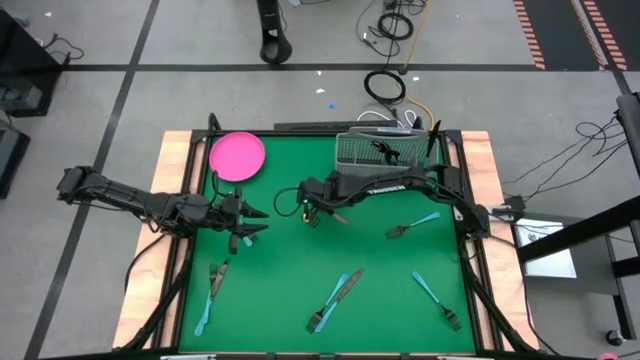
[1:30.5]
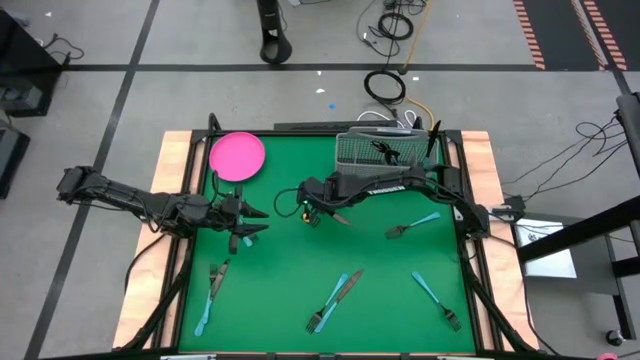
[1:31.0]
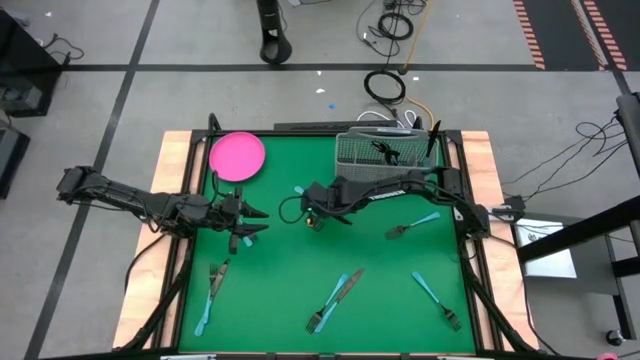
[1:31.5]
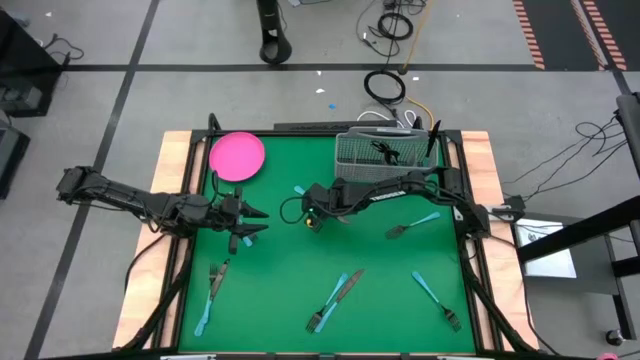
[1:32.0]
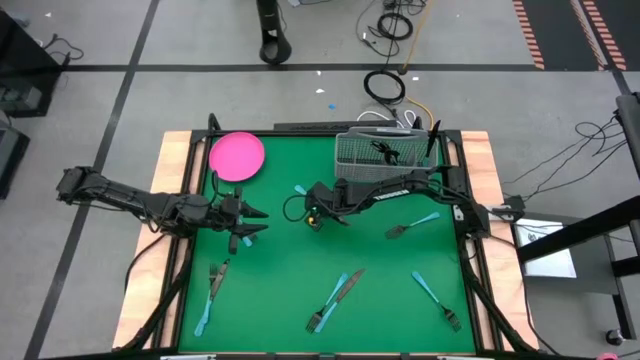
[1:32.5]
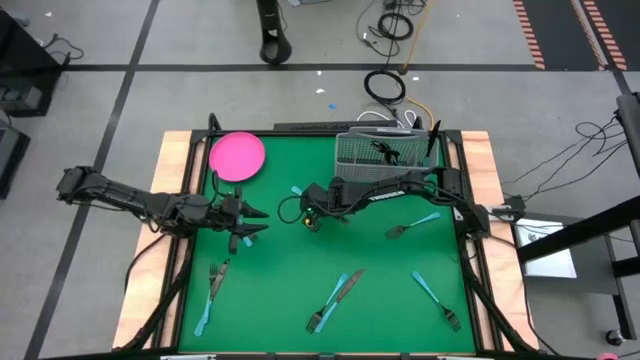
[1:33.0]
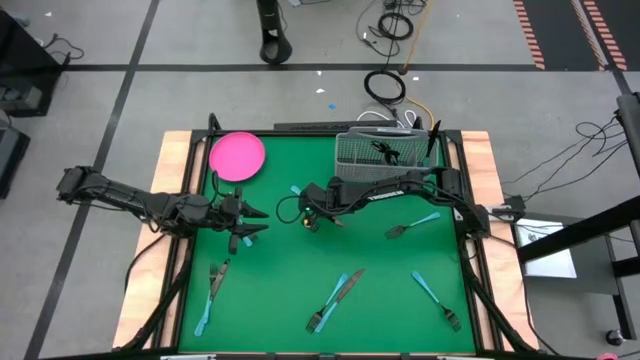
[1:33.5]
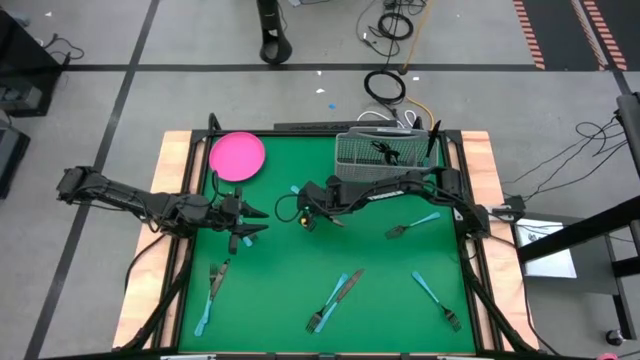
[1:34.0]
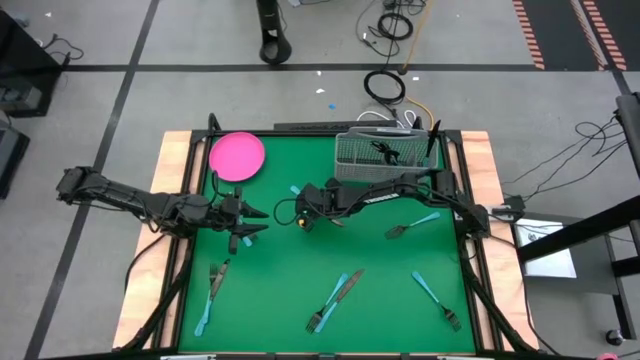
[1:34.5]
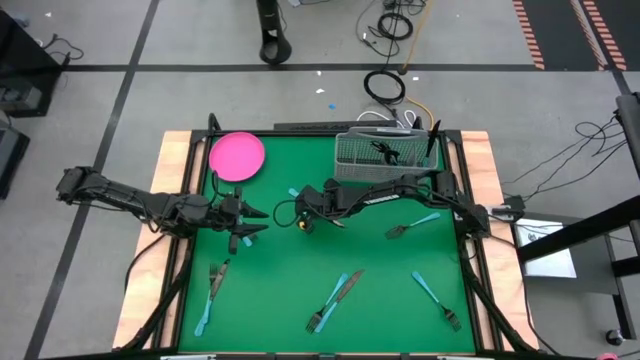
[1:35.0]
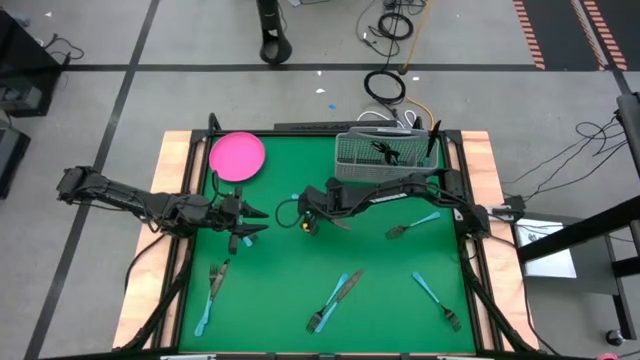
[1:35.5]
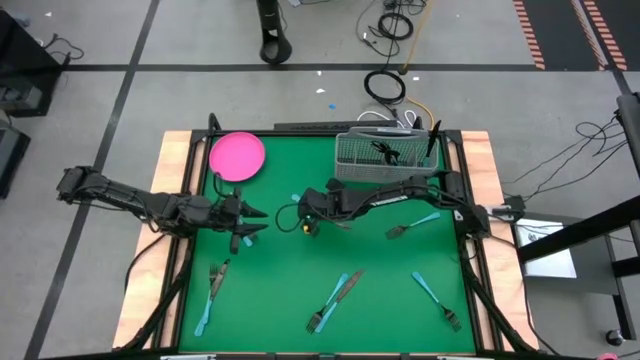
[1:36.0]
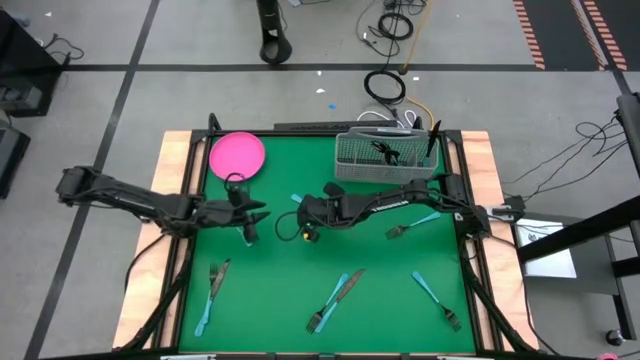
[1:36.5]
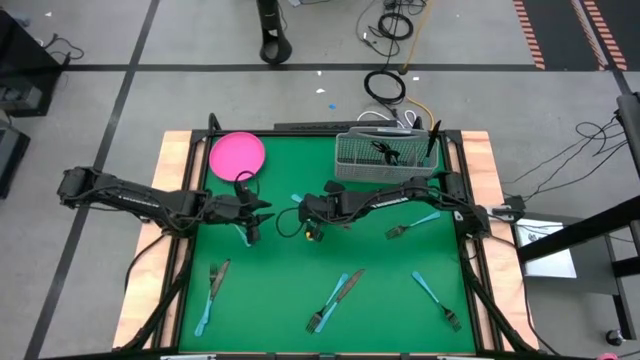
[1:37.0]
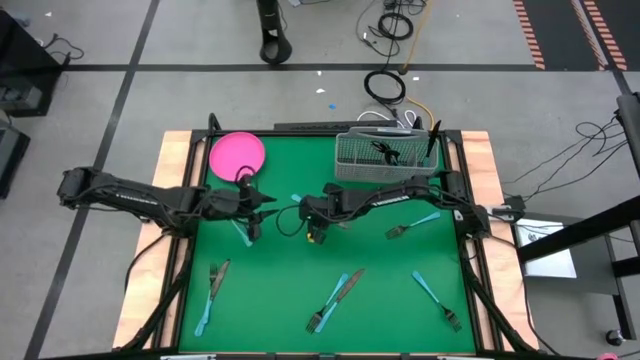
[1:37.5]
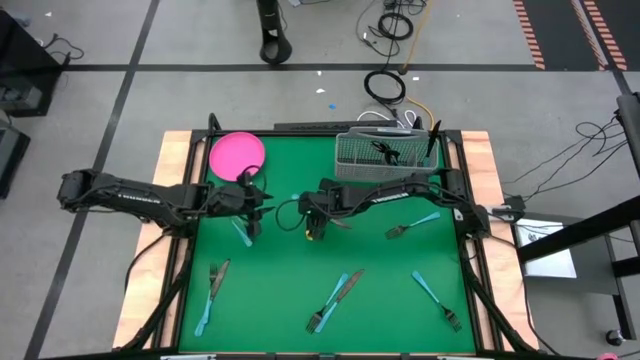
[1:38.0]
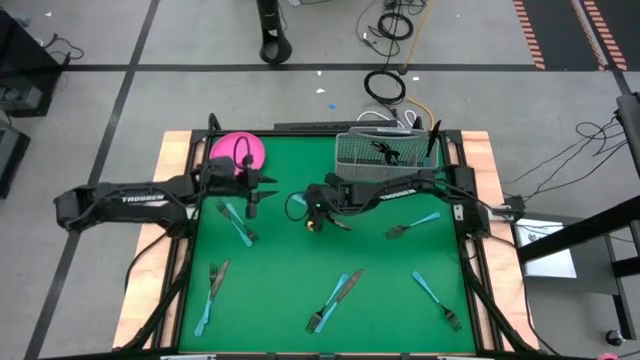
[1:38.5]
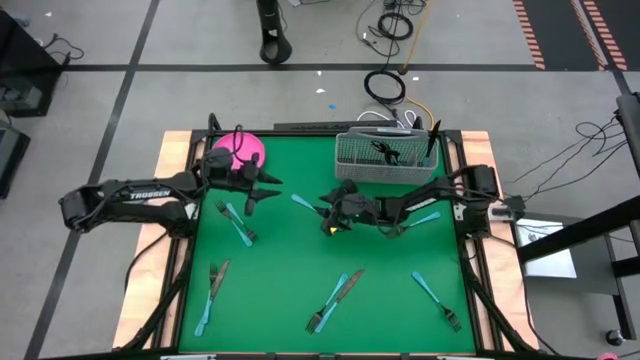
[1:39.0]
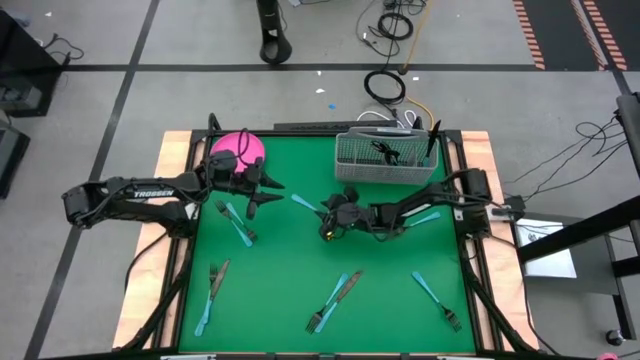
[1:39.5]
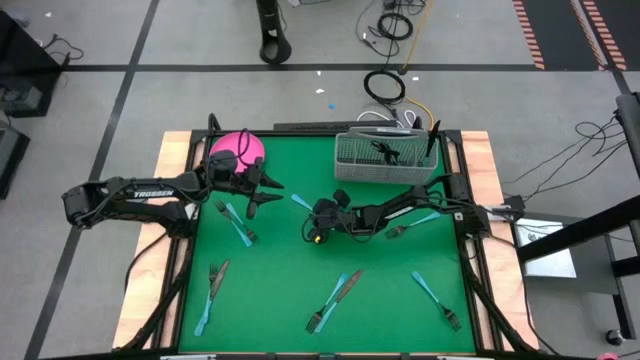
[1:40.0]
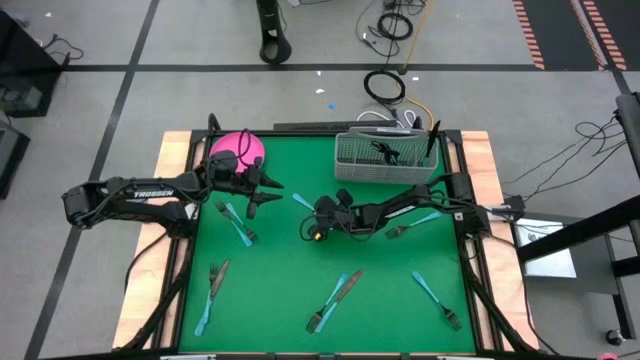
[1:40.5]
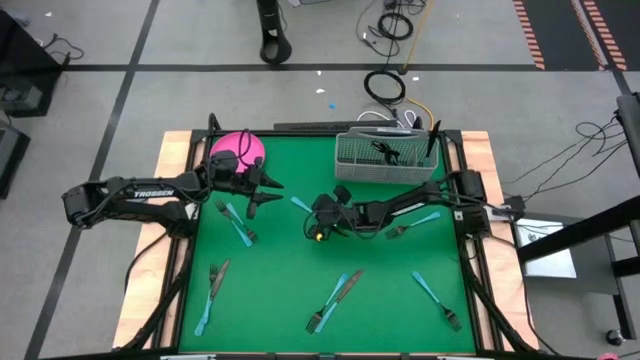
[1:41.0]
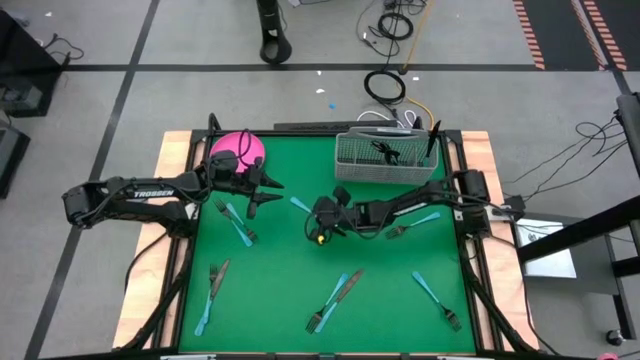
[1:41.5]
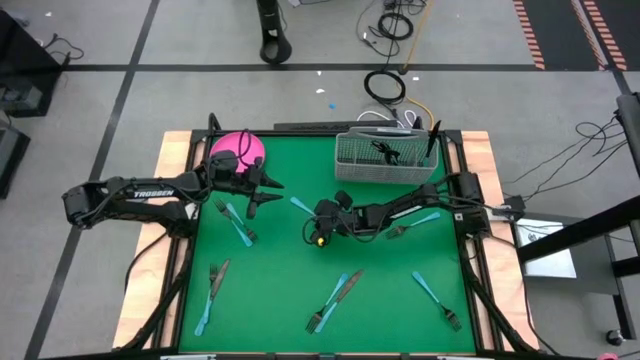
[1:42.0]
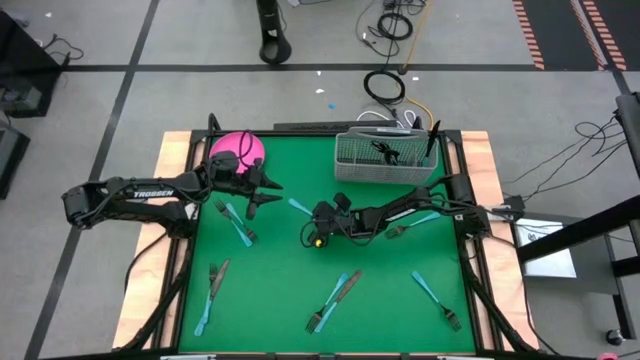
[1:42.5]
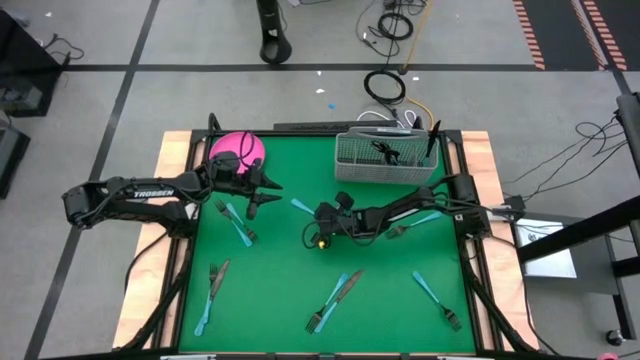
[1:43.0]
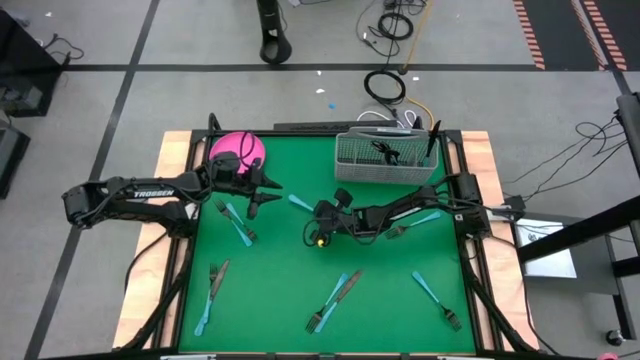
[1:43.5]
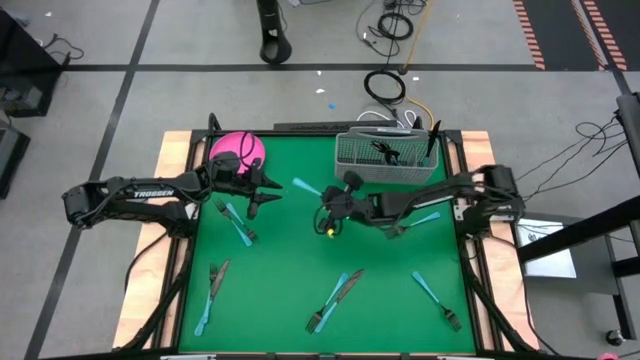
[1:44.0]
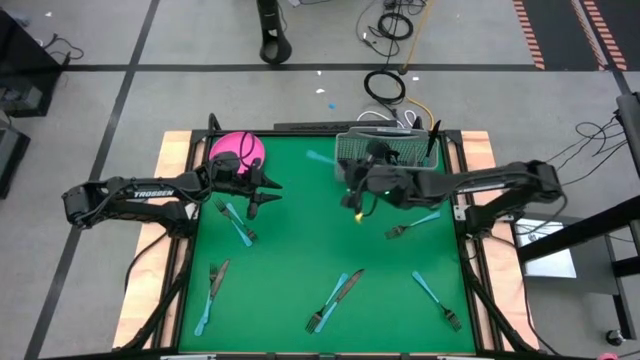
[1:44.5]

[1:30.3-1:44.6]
Task: Sort silverware
Put the top black knife into the cutlery rack with the other black knife

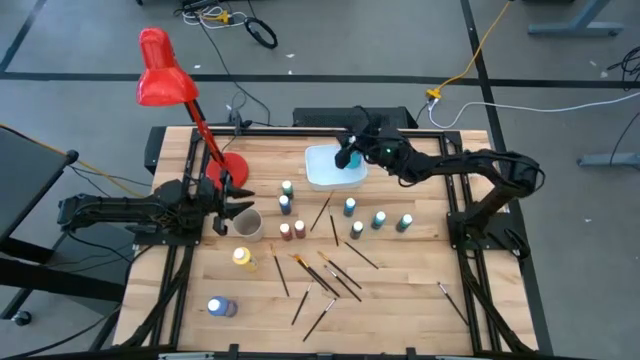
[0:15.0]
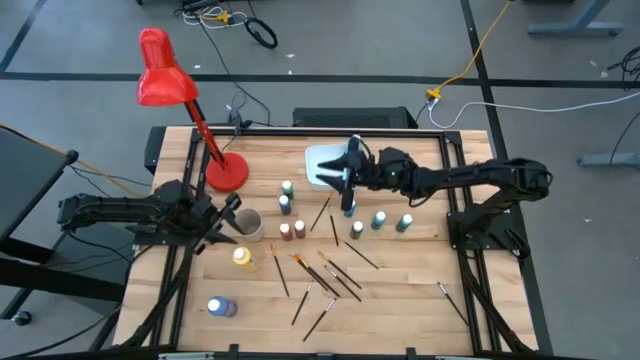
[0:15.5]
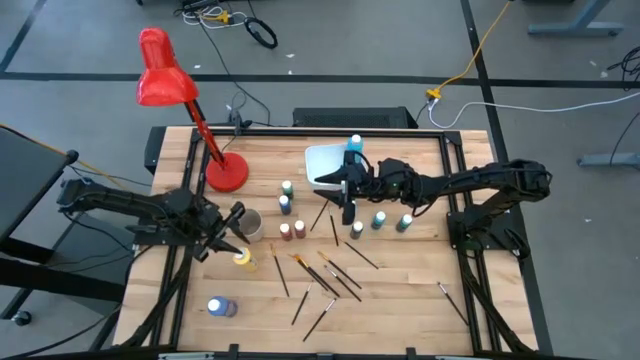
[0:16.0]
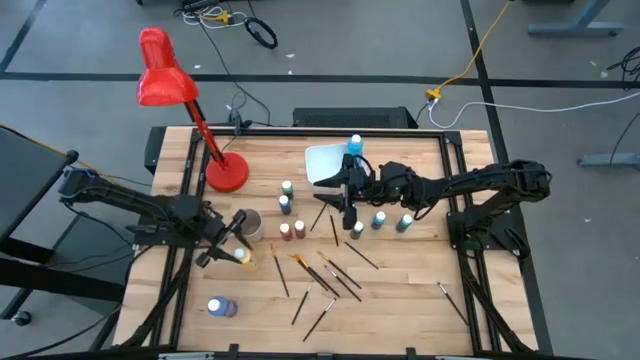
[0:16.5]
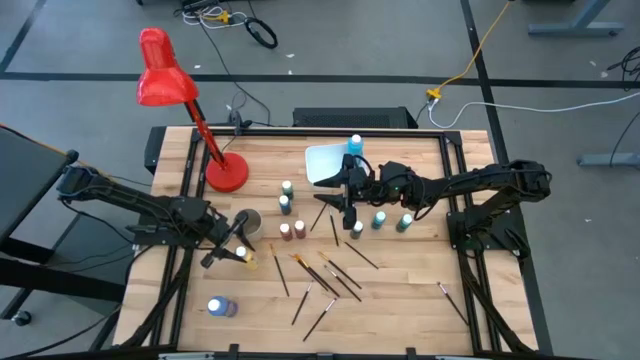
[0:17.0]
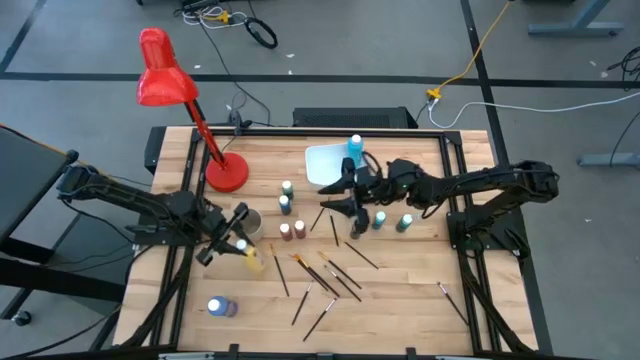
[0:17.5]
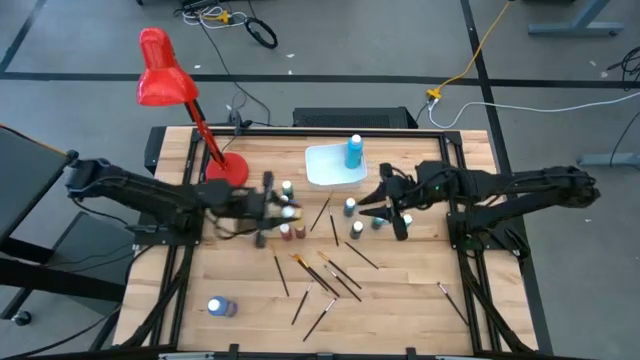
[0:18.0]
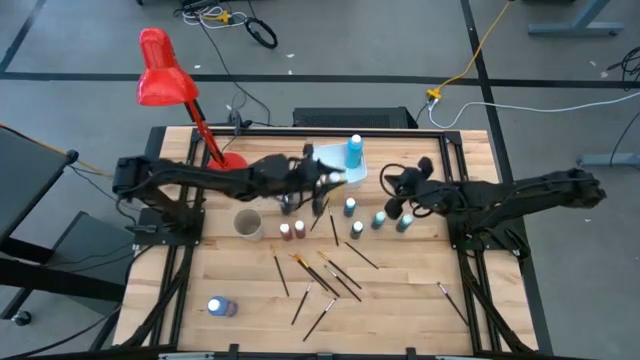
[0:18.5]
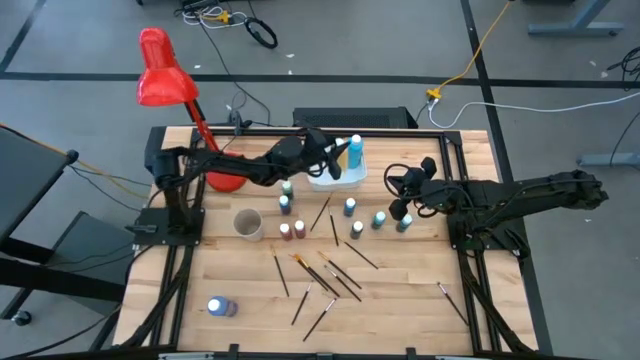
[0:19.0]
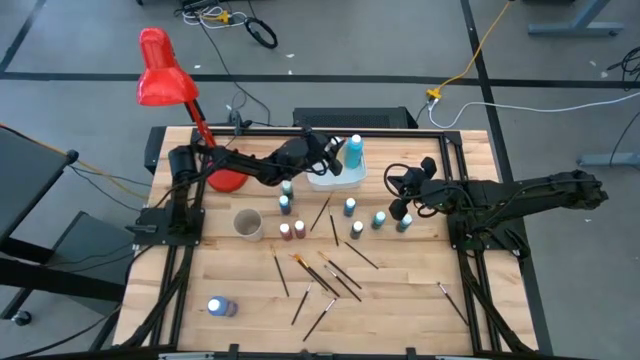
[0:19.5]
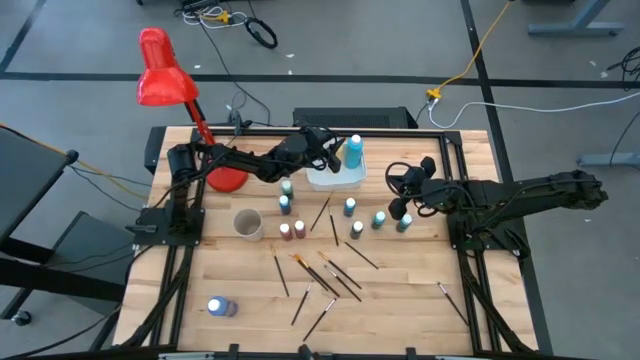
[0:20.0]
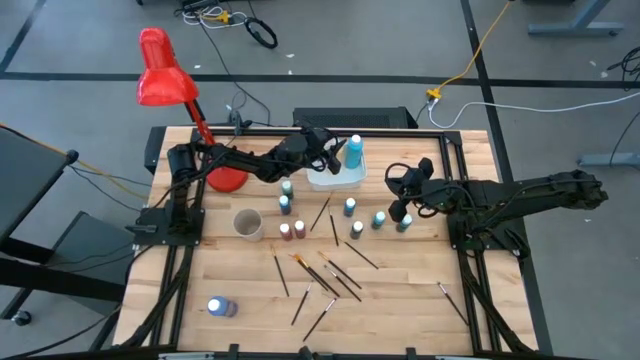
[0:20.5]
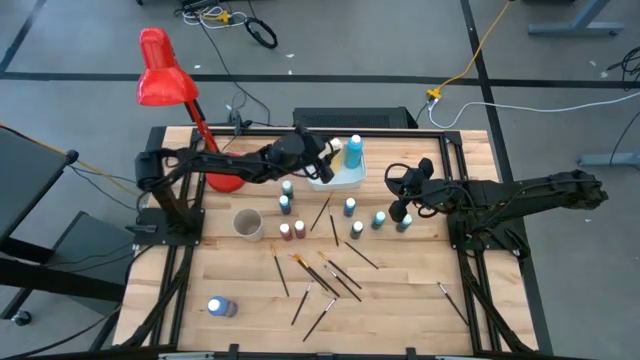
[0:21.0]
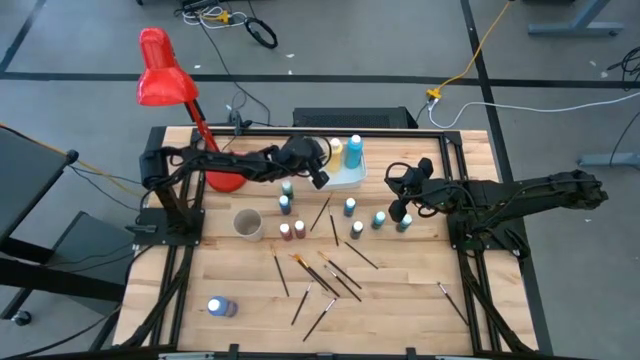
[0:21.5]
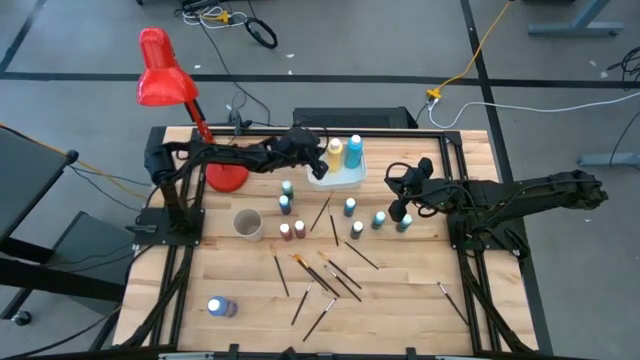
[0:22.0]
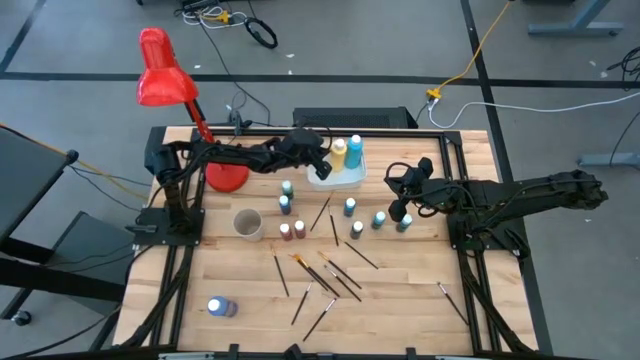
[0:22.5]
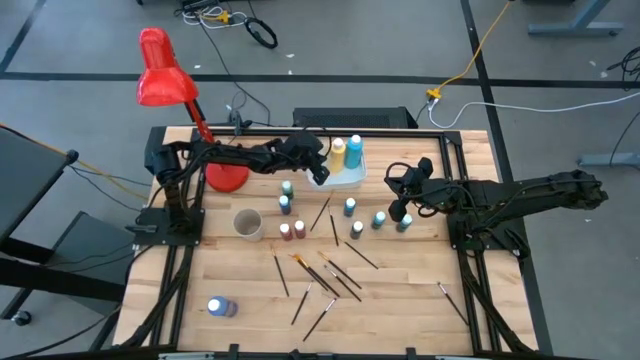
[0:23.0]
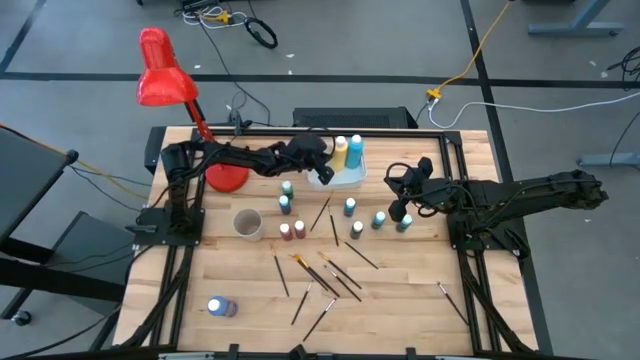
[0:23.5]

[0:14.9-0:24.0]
Task: Pick & Place Paint Supplies
Put the large yellow paint bottle into the white bin
